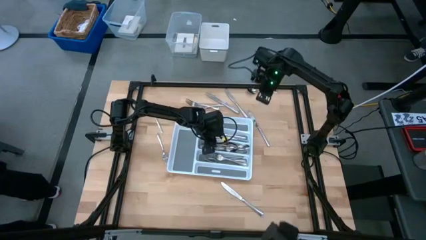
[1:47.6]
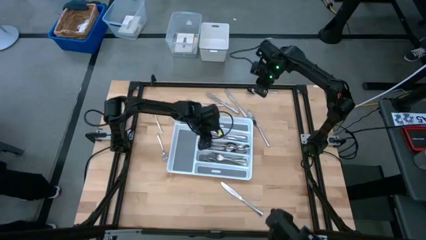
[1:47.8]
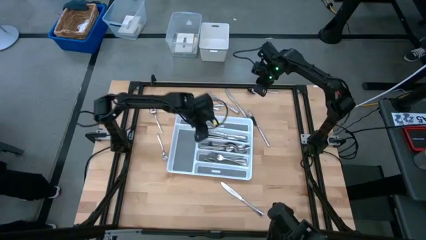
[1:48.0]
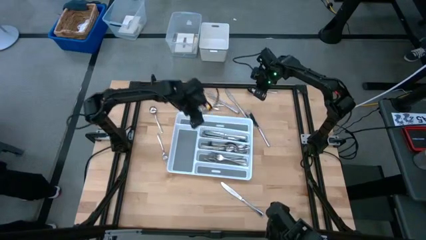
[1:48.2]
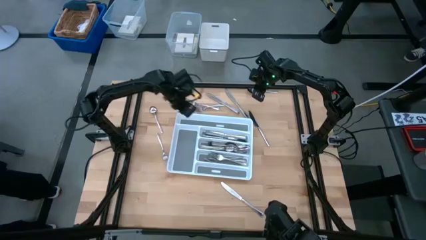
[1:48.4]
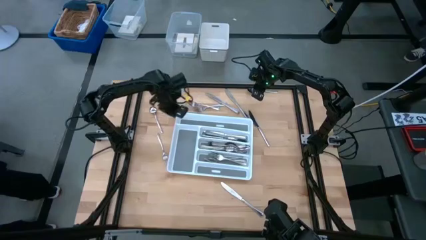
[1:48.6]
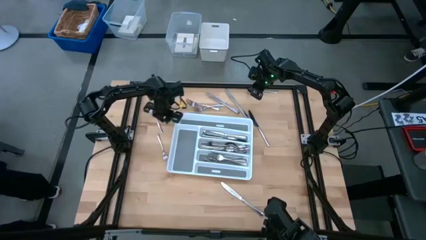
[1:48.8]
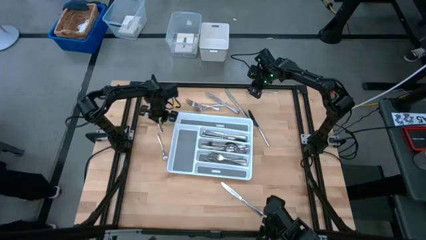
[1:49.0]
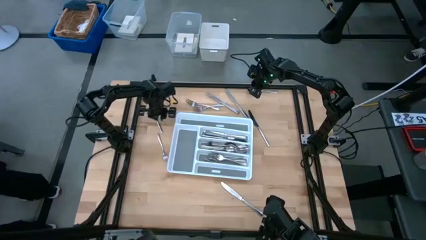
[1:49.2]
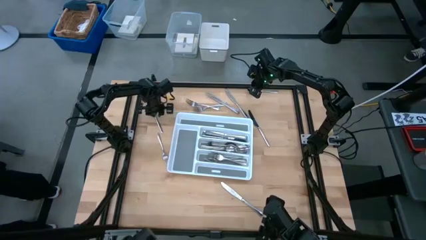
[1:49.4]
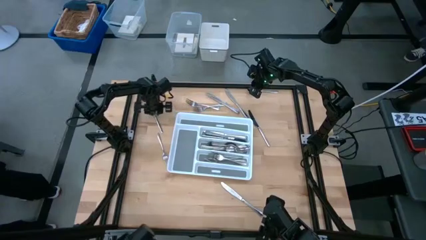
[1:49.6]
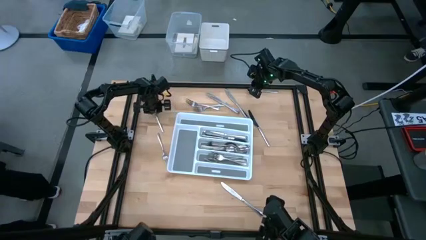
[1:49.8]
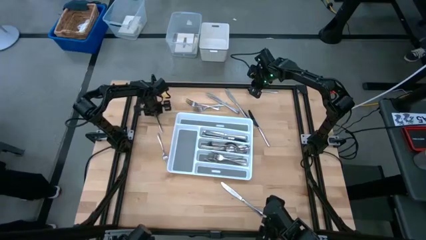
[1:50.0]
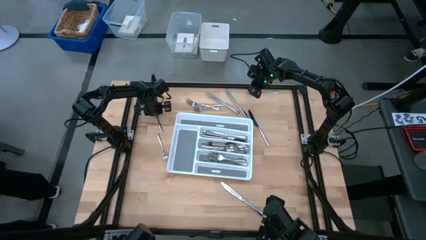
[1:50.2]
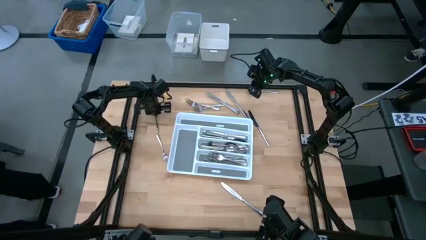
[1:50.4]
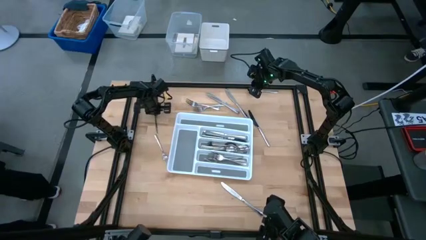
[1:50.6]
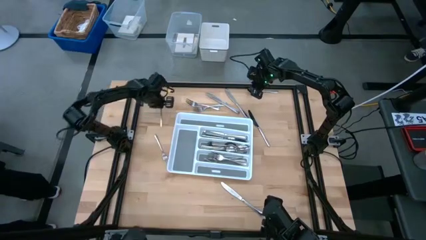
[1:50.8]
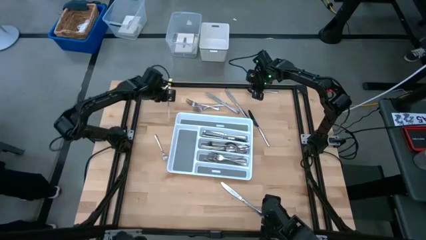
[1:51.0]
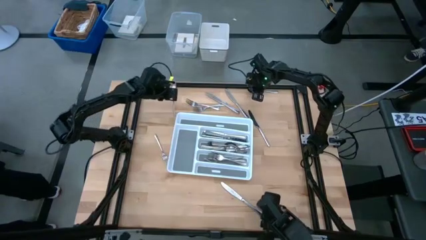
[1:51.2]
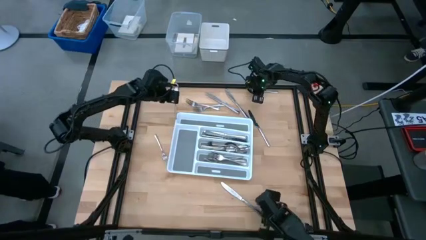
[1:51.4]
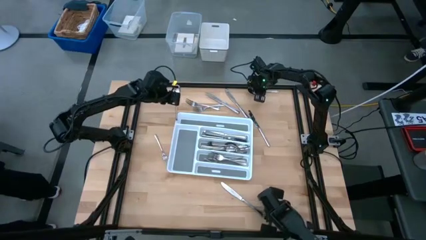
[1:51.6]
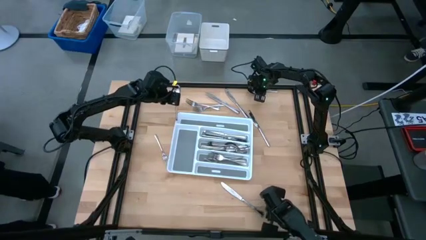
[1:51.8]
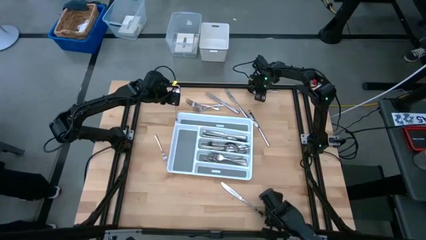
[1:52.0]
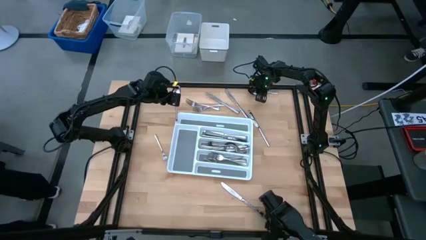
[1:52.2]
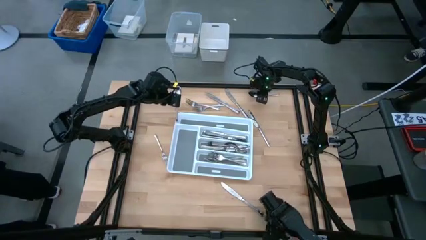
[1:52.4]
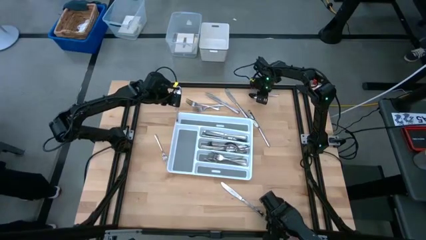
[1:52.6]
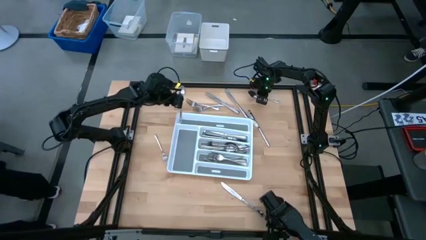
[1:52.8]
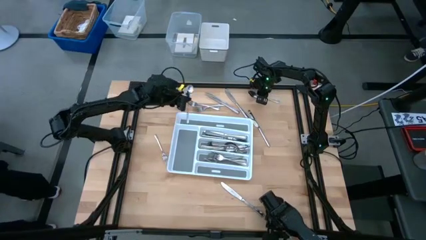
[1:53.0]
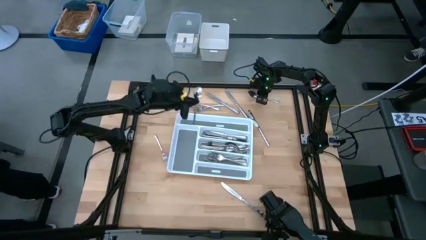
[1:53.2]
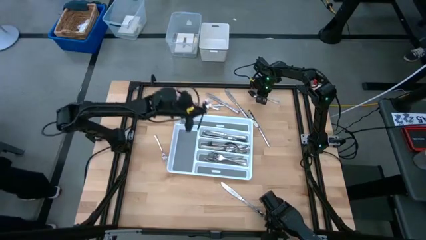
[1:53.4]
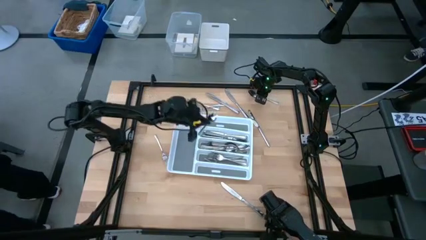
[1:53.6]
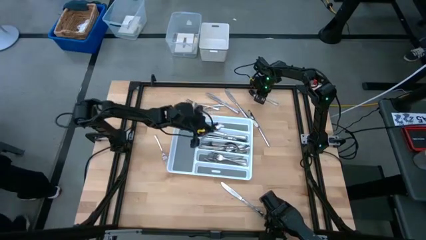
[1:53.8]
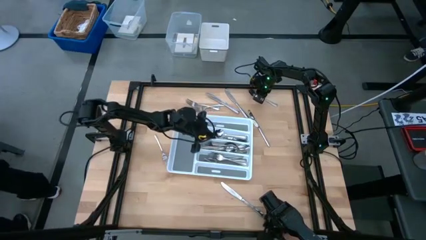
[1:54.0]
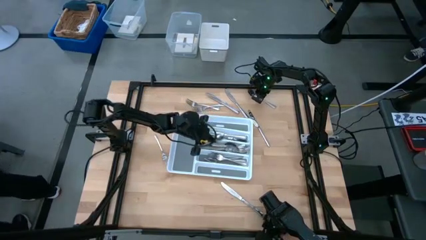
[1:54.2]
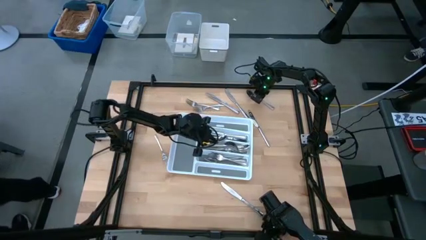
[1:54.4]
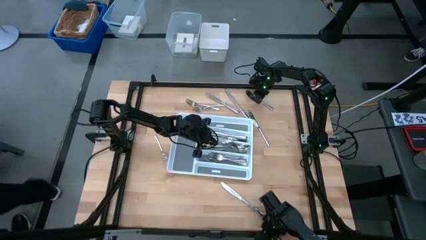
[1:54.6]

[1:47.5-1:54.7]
Task: Sort silverware
Put the spoon into the organizer tray

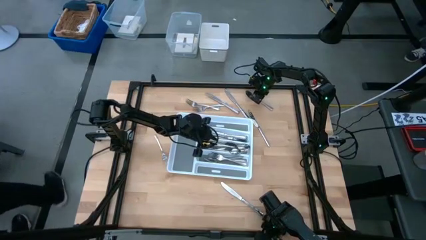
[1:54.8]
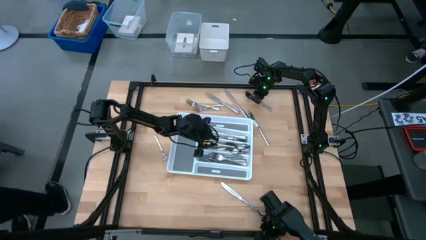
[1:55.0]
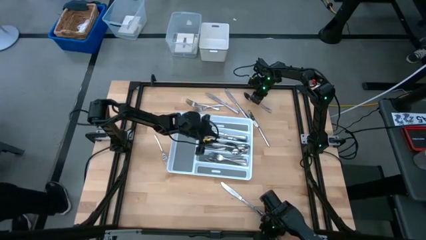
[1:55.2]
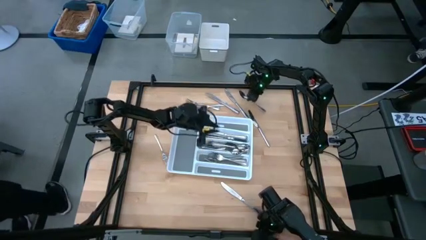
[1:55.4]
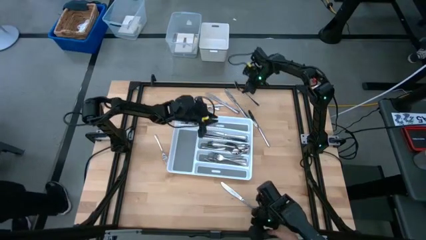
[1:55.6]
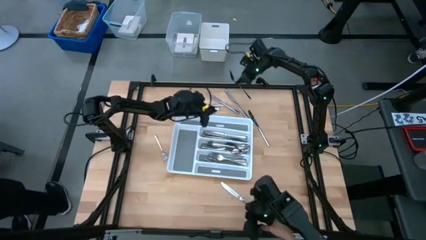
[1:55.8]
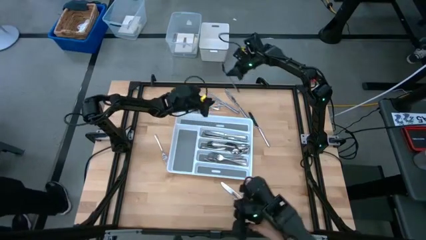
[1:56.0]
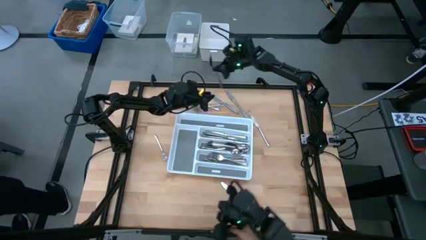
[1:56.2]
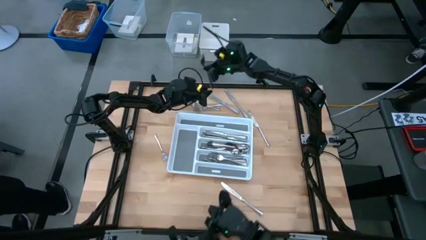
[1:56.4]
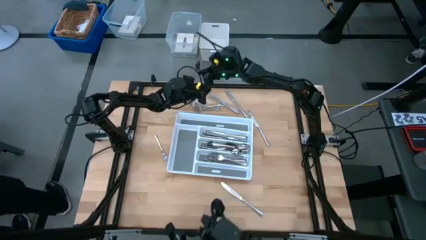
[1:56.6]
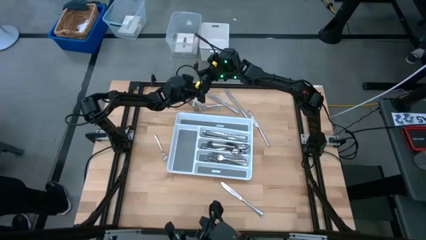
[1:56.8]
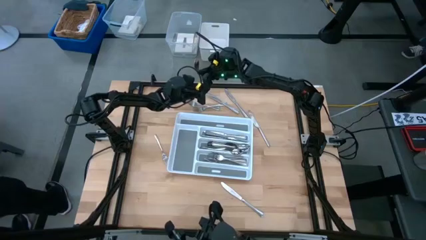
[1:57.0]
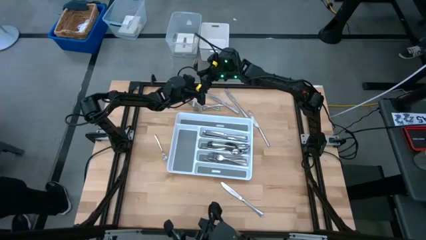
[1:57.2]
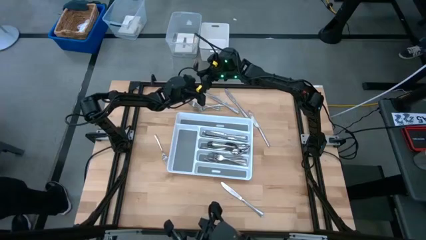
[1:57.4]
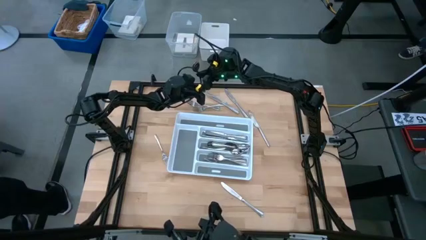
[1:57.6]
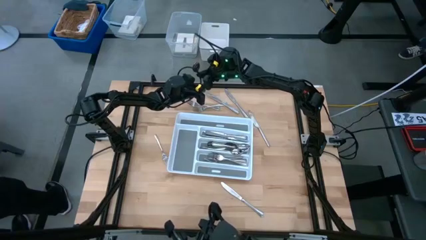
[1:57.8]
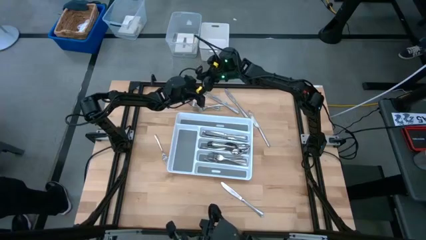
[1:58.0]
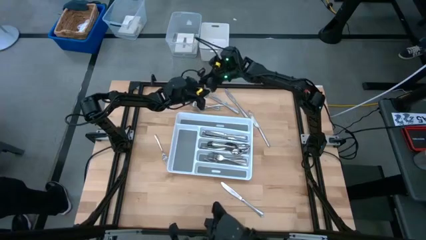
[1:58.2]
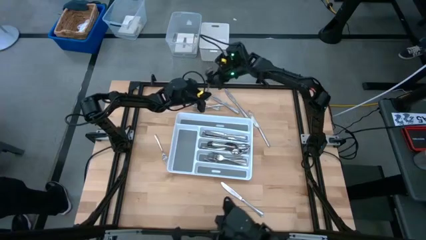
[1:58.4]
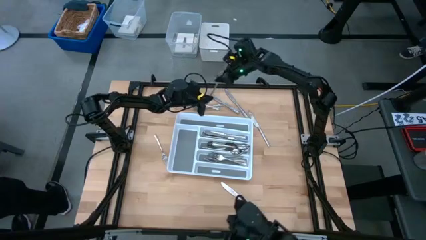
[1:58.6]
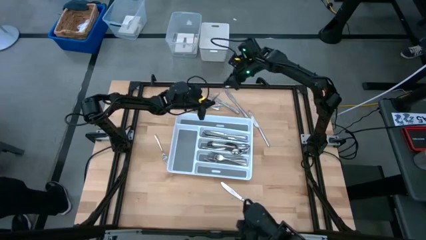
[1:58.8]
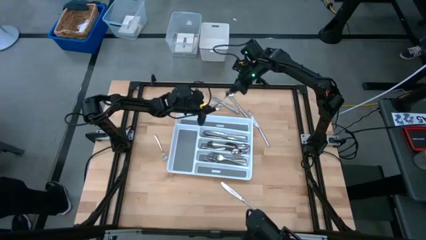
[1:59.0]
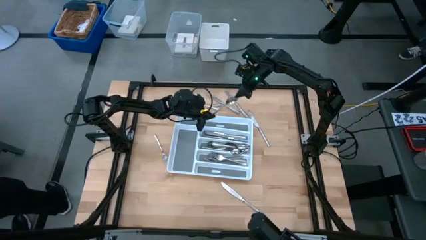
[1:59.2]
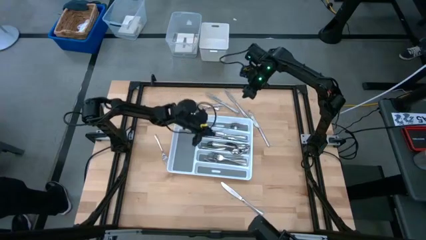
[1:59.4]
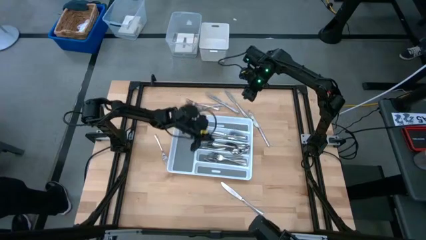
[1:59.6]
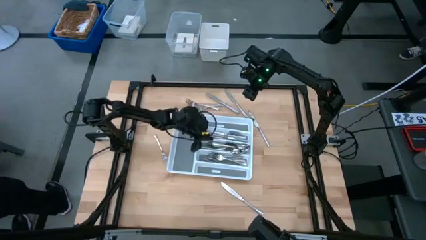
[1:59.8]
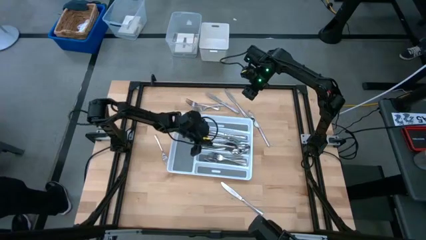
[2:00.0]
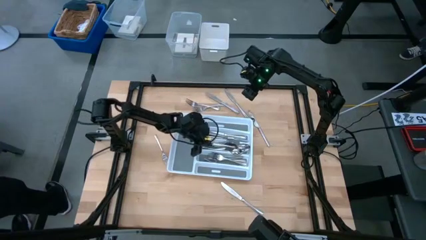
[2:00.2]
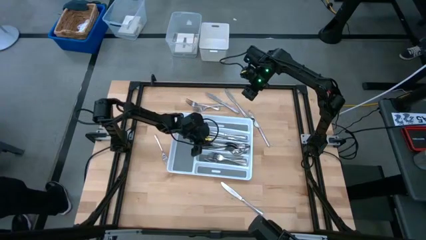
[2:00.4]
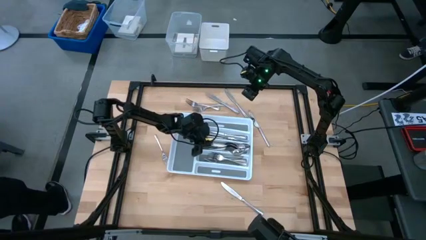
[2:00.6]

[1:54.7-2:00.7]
Put the spoon into the organizer tray

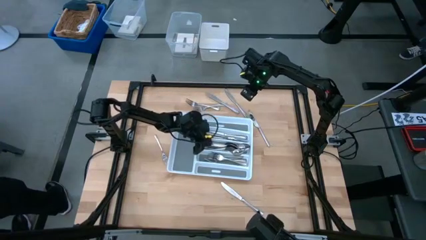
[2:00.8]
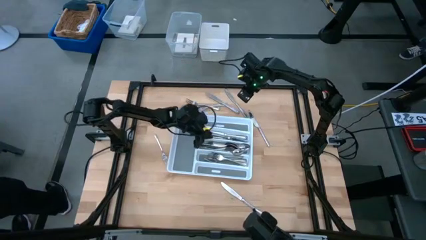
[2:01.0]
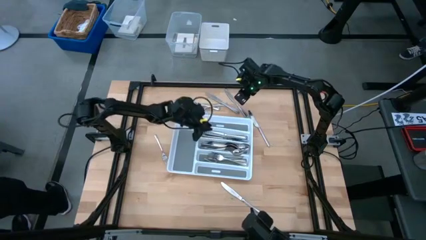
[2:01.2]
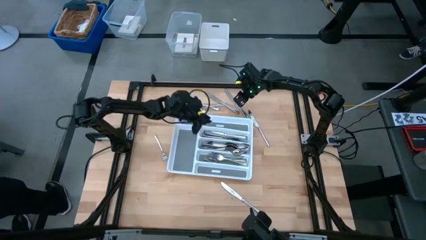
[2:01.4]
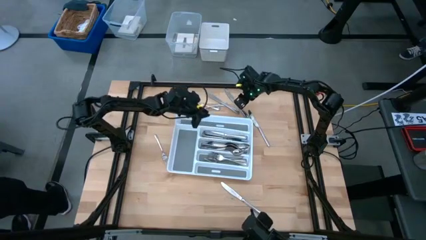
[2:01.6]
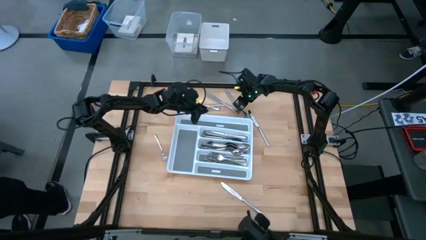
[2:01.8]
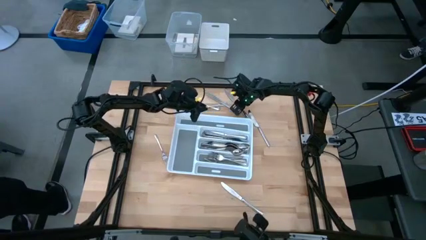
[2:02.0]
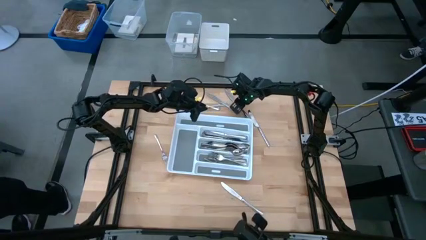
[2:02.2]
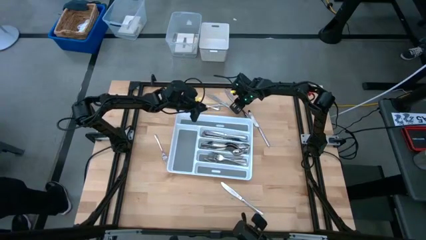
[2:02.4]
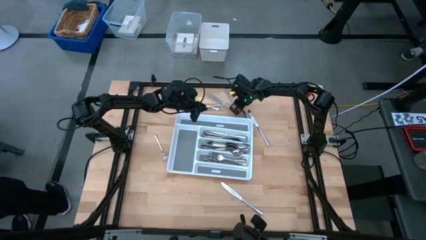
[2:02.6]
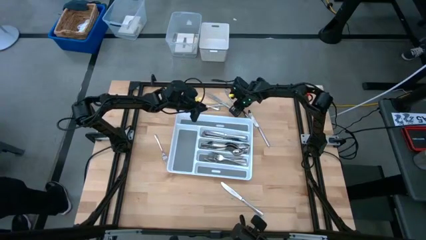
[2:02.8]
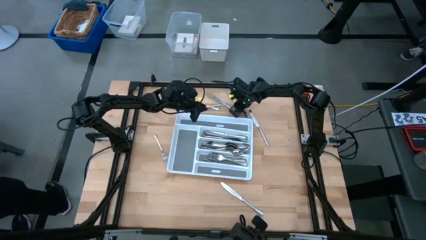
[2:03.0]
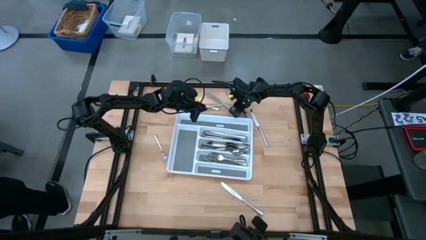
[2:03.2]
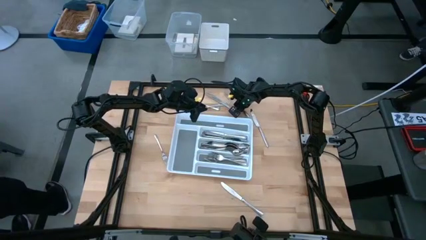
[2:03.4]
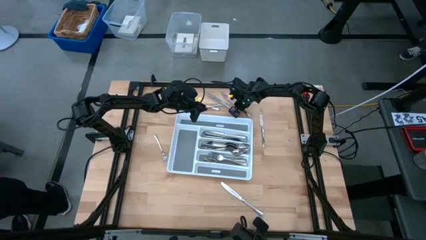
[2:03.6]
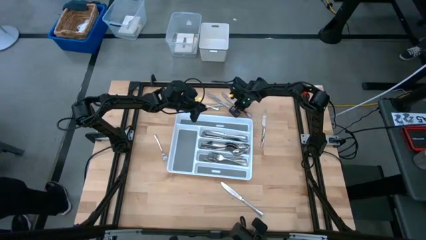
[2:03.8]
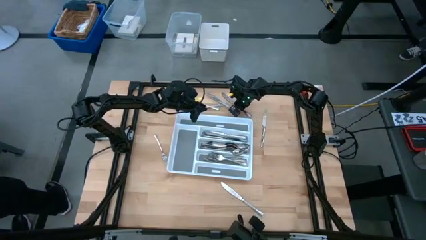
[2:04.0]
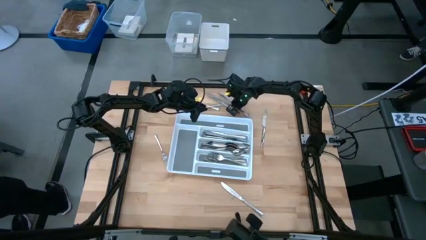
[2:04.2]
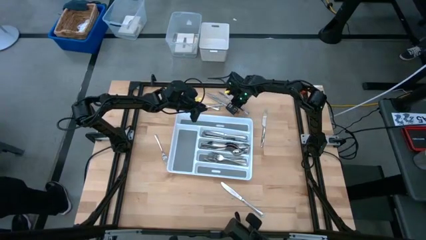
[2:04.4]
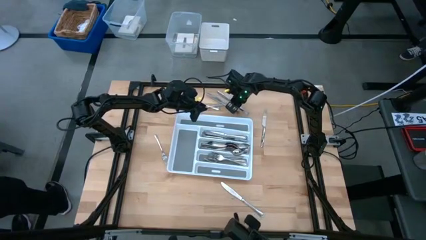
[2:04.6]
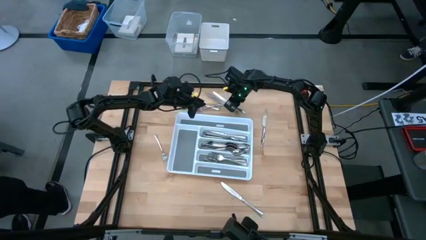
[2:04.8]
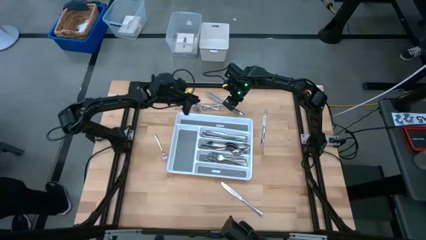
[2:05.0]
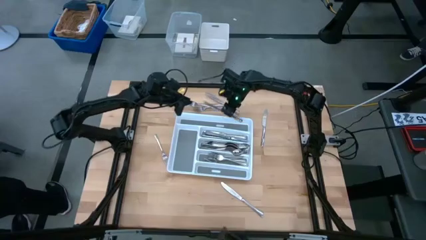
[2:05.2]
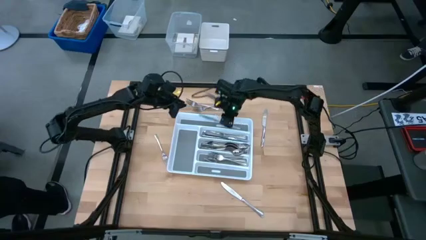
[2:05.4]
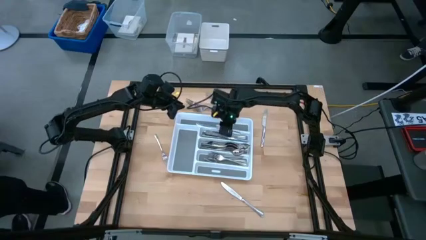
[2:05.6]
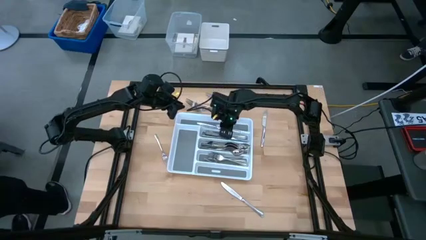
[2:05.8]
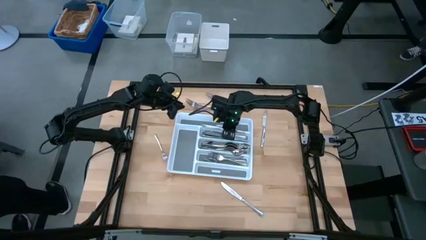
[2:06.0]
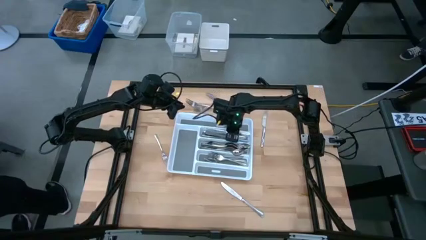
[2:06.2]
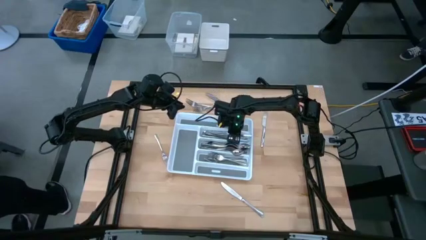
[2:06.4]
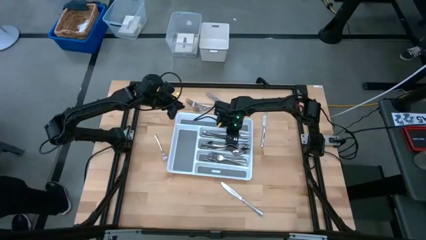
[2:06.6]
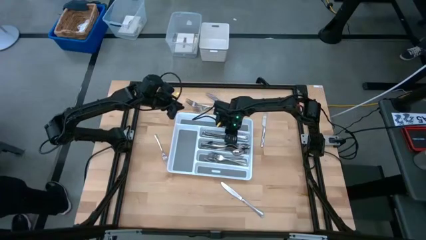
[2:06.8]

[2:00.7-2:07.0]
Put the knife into the organizer tray
